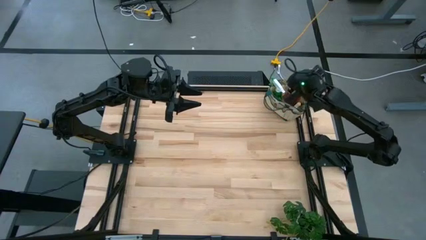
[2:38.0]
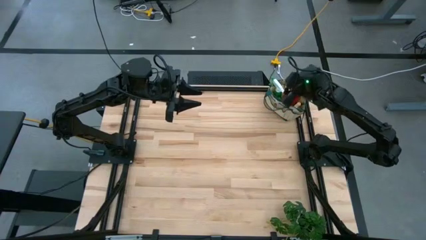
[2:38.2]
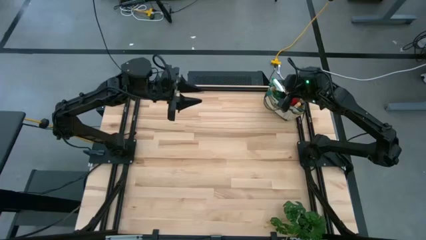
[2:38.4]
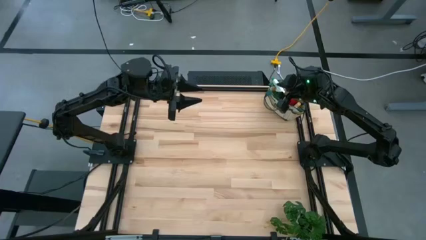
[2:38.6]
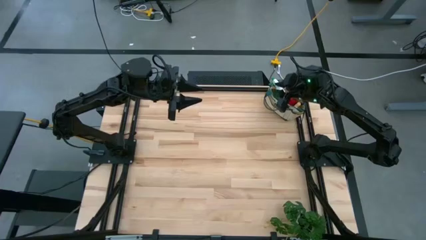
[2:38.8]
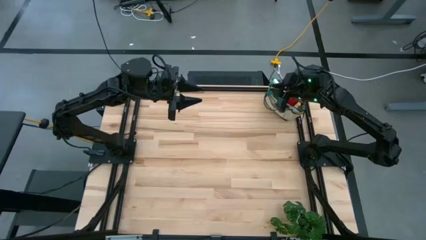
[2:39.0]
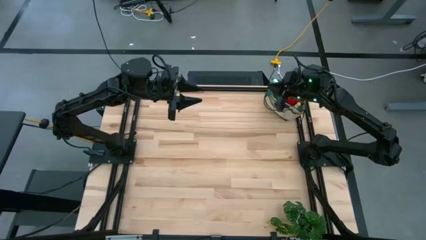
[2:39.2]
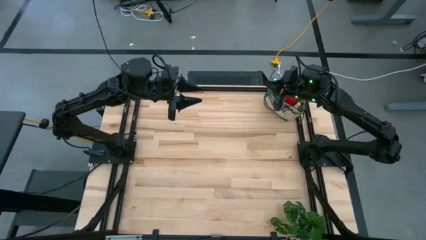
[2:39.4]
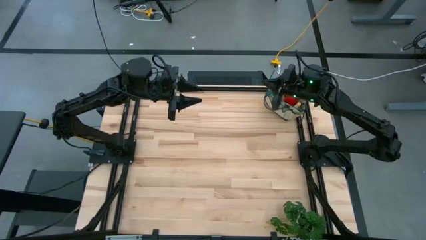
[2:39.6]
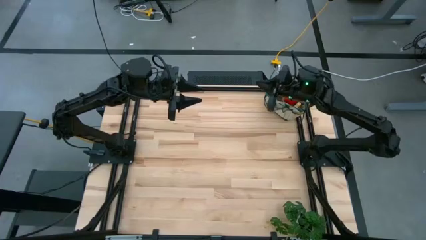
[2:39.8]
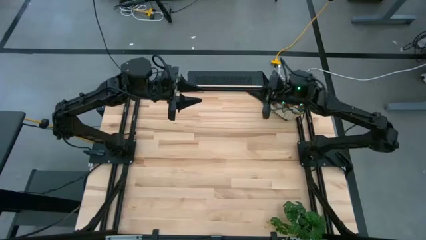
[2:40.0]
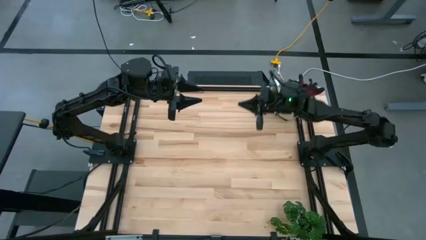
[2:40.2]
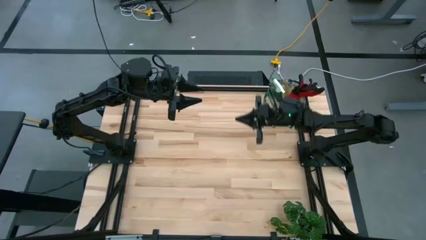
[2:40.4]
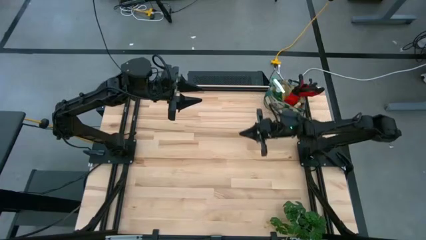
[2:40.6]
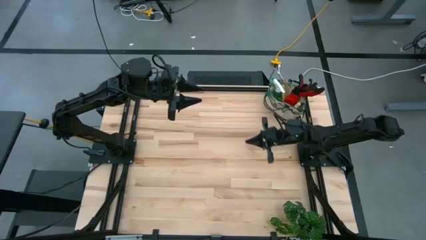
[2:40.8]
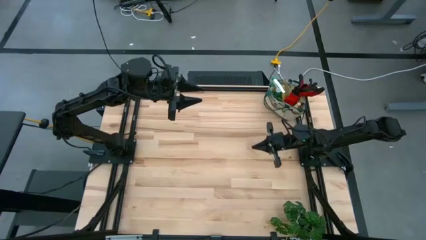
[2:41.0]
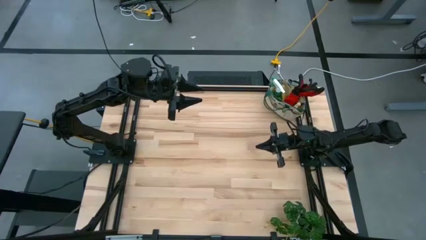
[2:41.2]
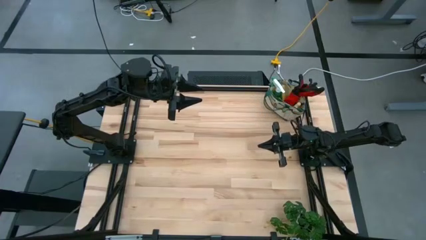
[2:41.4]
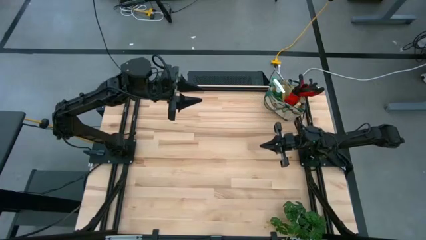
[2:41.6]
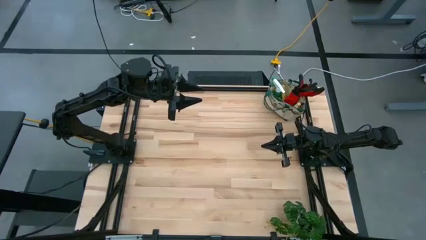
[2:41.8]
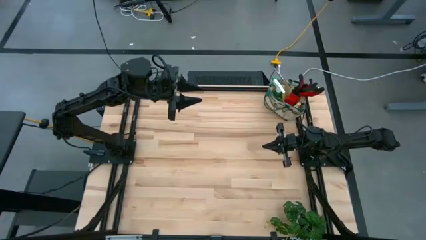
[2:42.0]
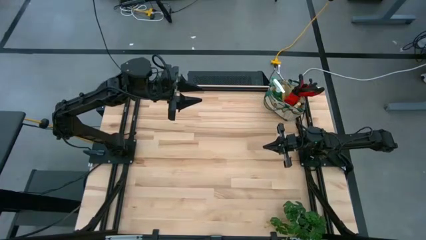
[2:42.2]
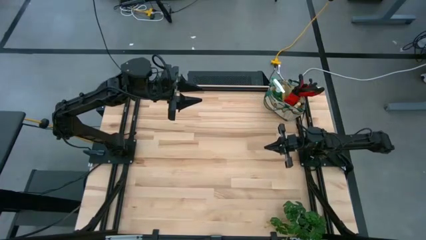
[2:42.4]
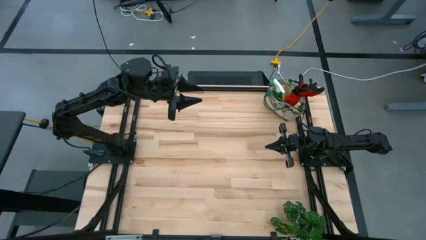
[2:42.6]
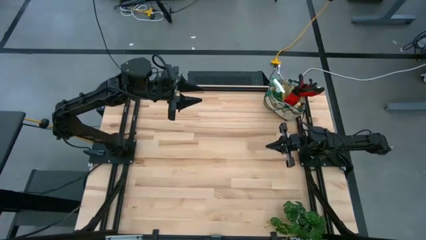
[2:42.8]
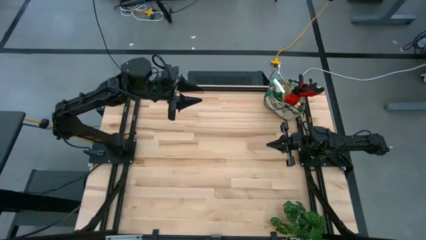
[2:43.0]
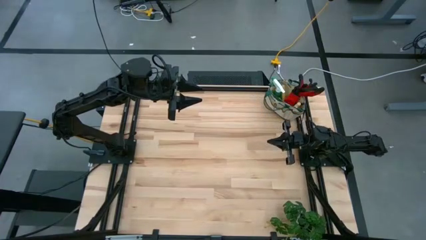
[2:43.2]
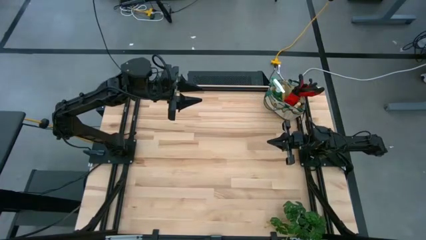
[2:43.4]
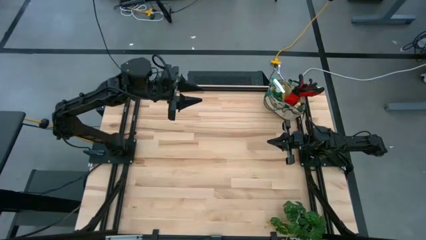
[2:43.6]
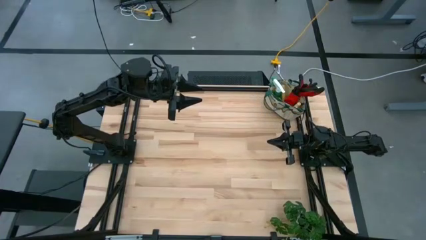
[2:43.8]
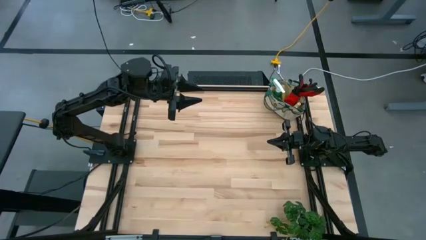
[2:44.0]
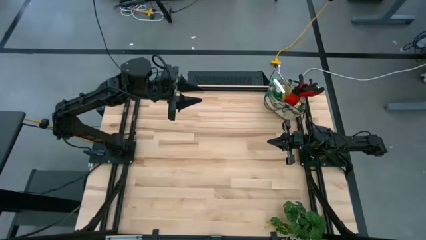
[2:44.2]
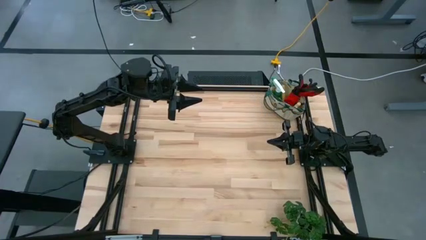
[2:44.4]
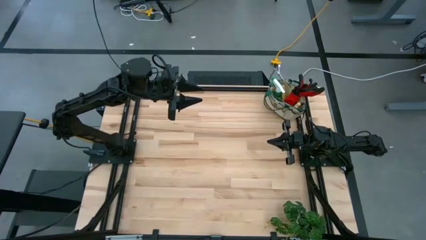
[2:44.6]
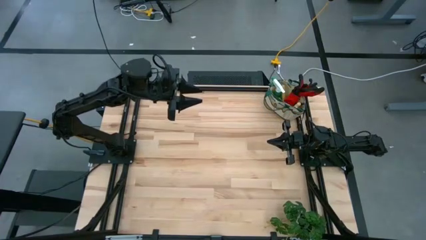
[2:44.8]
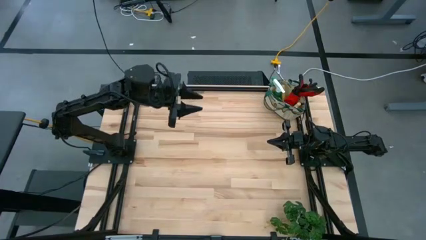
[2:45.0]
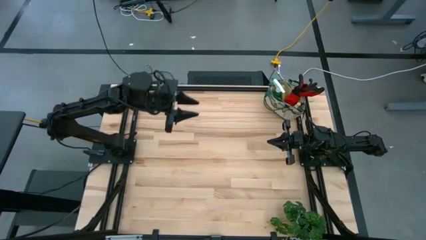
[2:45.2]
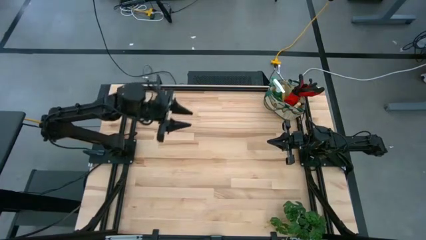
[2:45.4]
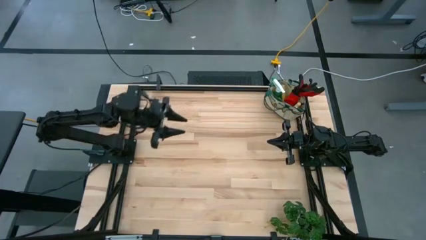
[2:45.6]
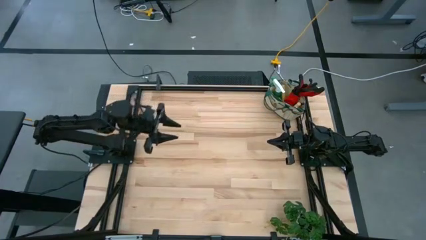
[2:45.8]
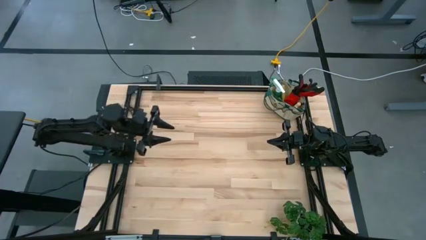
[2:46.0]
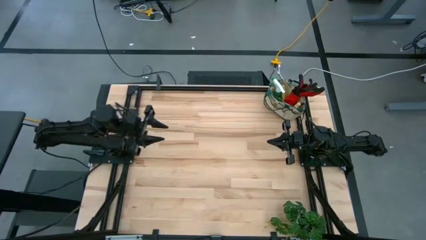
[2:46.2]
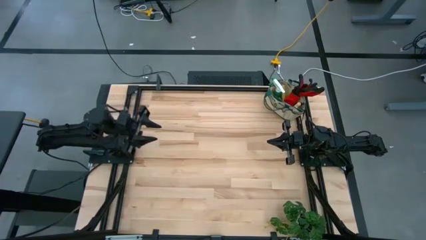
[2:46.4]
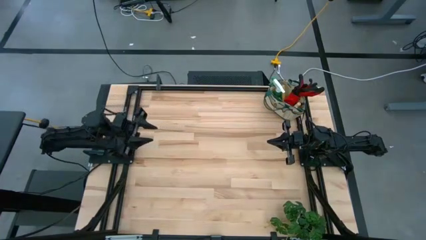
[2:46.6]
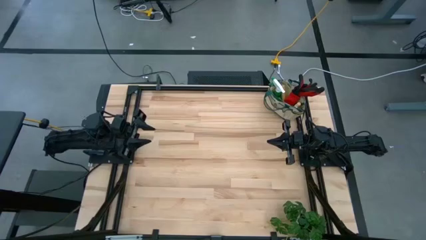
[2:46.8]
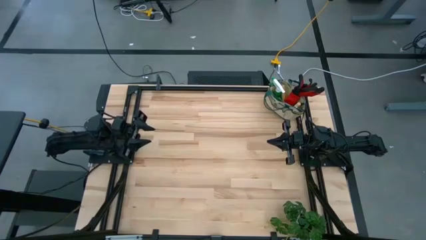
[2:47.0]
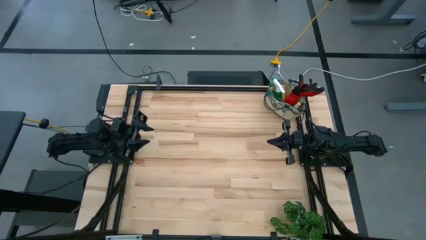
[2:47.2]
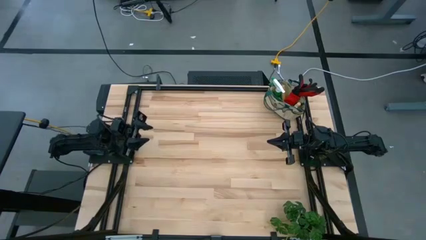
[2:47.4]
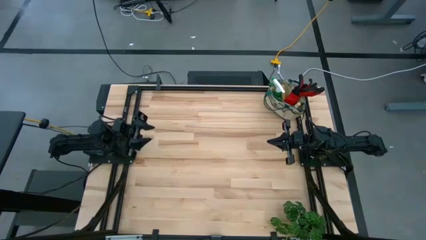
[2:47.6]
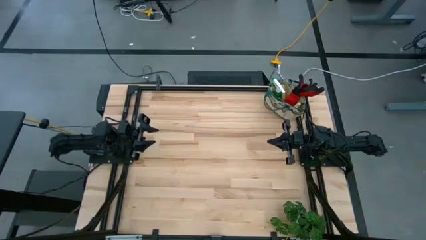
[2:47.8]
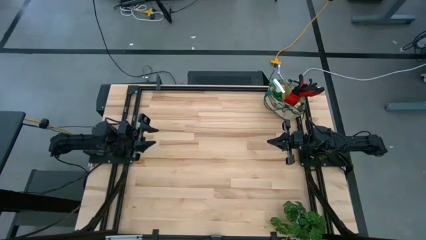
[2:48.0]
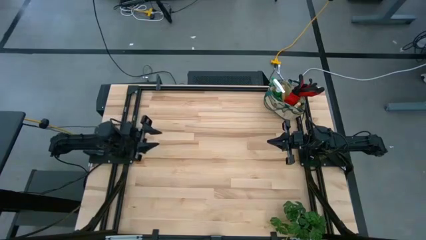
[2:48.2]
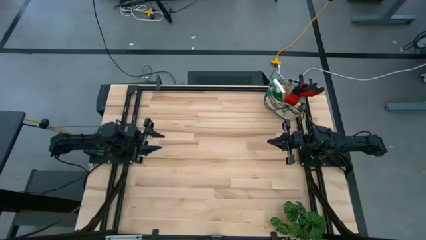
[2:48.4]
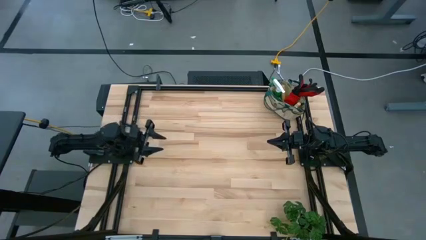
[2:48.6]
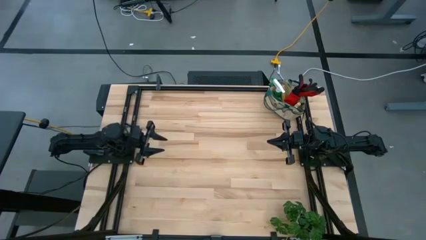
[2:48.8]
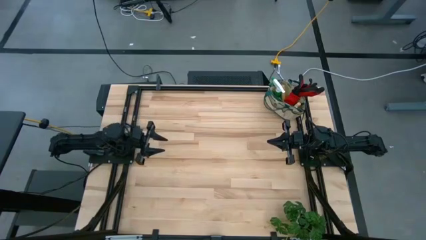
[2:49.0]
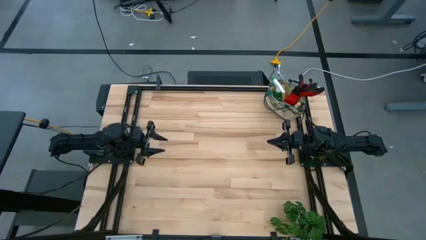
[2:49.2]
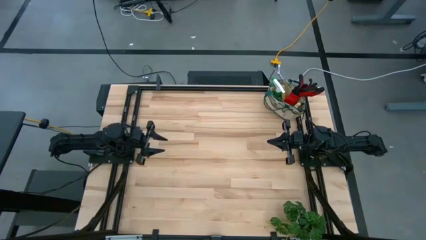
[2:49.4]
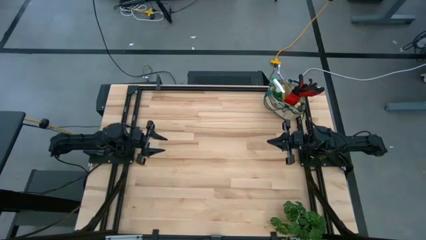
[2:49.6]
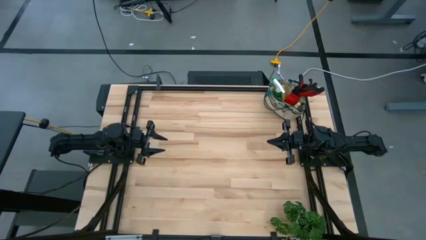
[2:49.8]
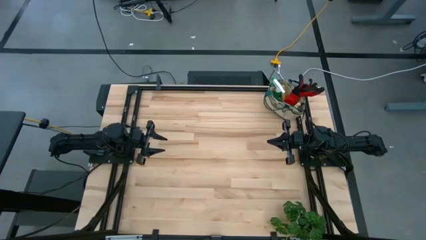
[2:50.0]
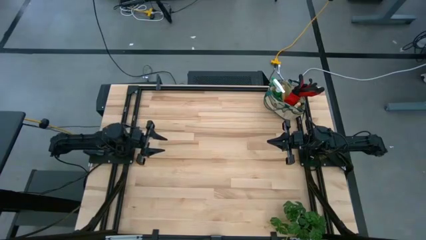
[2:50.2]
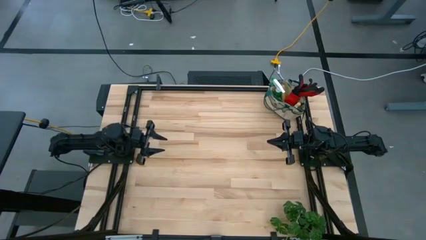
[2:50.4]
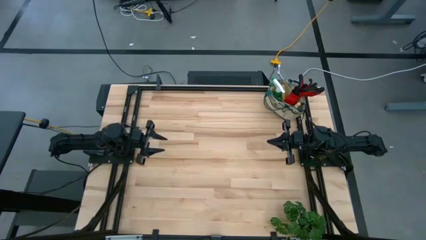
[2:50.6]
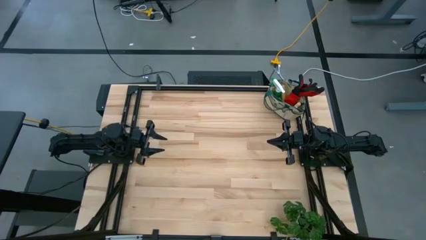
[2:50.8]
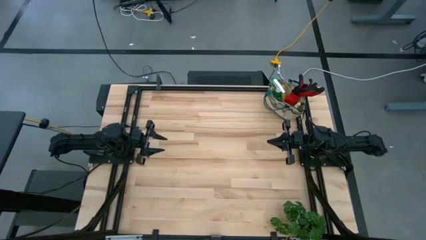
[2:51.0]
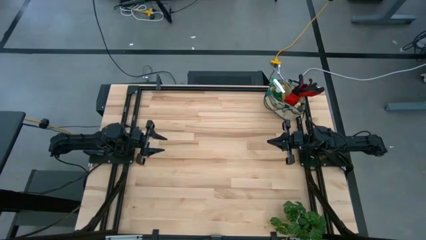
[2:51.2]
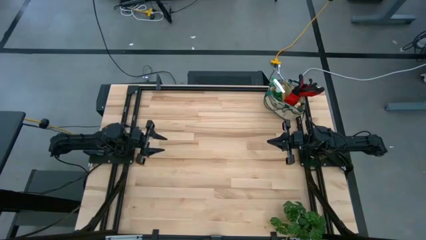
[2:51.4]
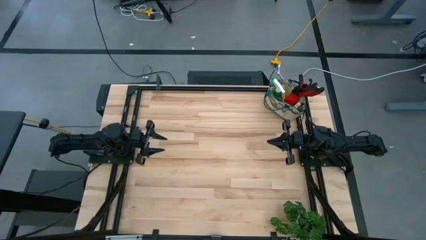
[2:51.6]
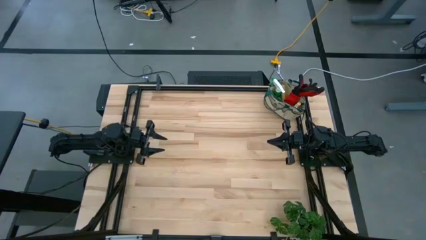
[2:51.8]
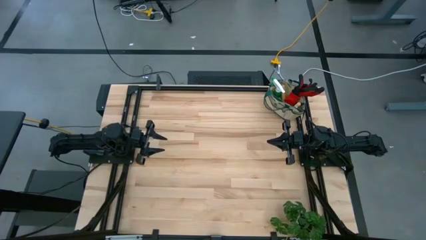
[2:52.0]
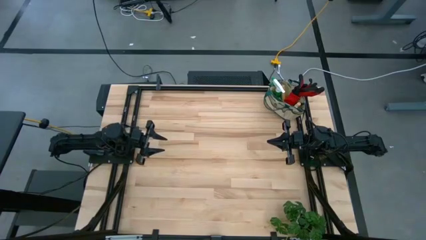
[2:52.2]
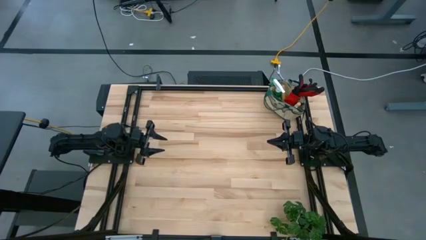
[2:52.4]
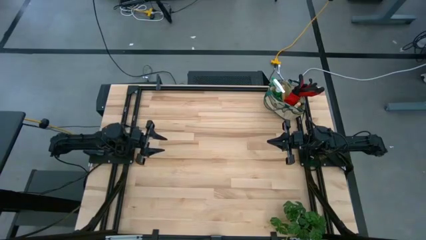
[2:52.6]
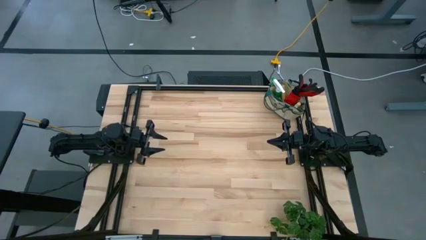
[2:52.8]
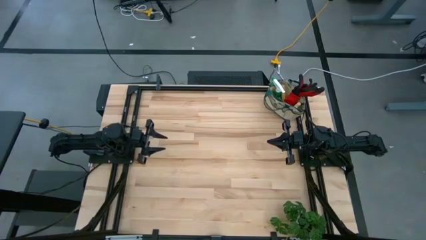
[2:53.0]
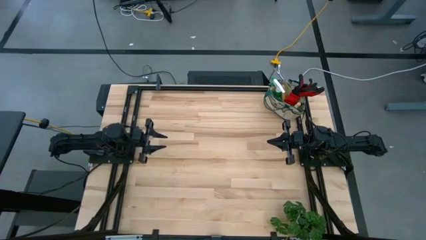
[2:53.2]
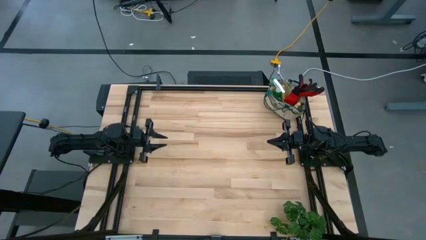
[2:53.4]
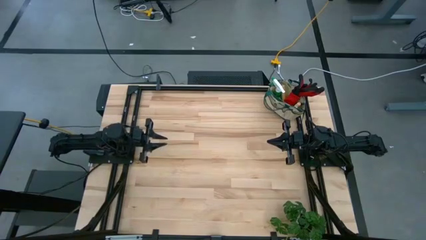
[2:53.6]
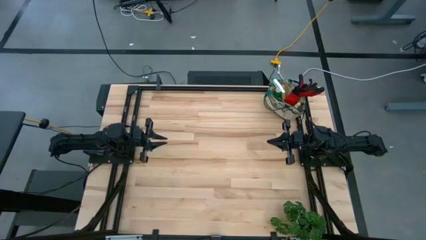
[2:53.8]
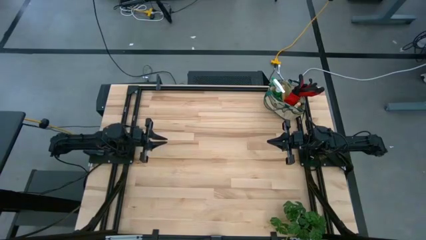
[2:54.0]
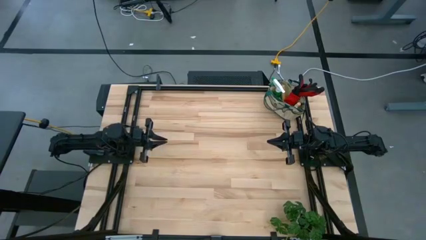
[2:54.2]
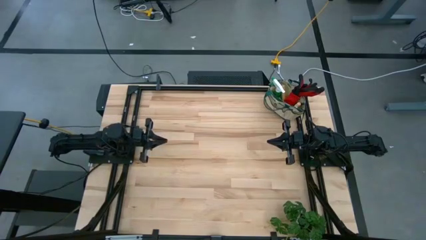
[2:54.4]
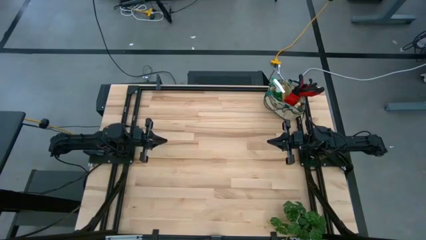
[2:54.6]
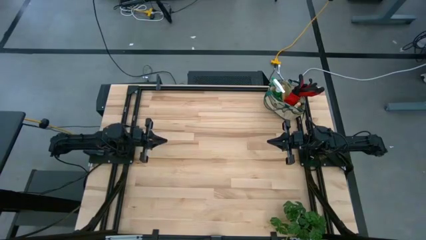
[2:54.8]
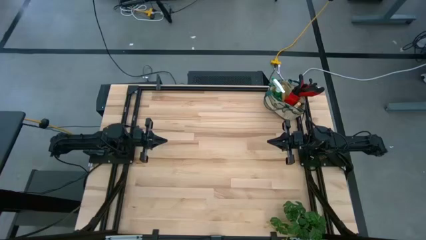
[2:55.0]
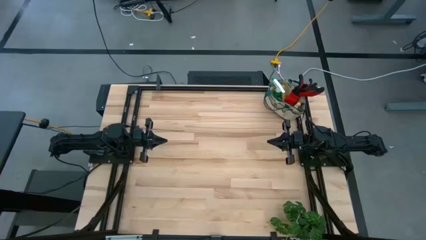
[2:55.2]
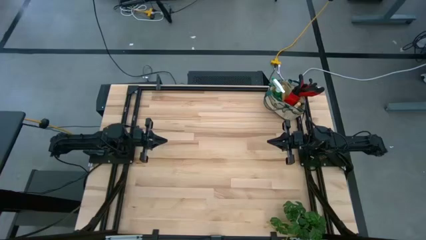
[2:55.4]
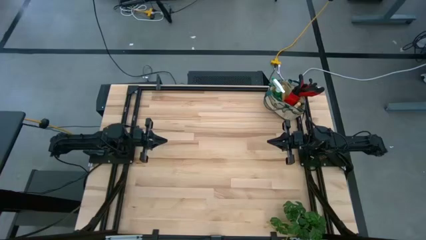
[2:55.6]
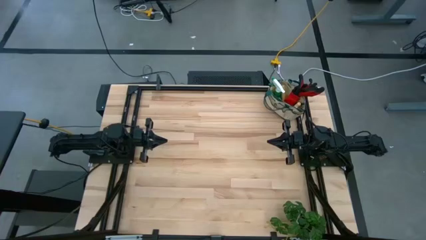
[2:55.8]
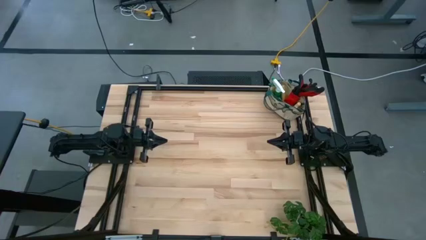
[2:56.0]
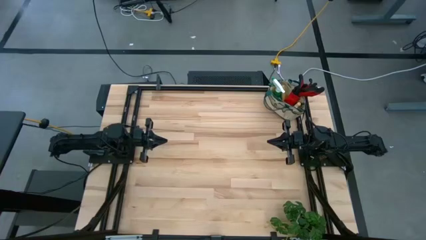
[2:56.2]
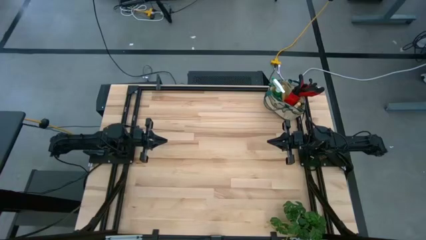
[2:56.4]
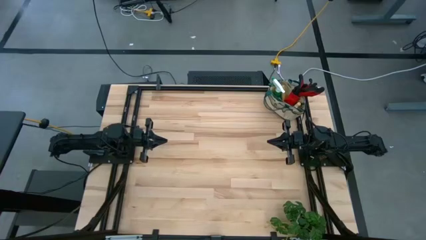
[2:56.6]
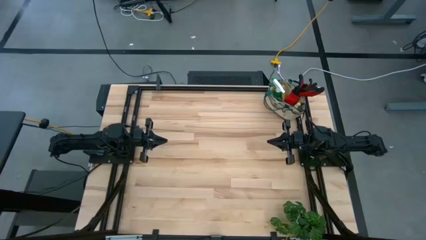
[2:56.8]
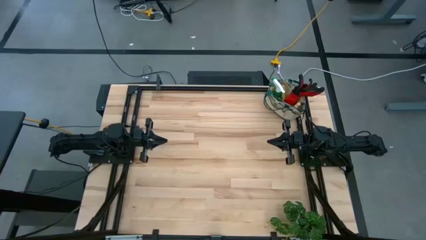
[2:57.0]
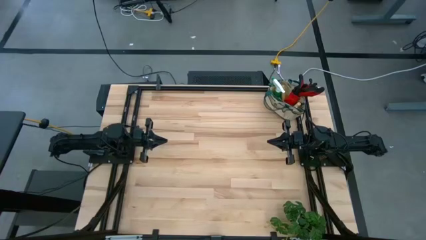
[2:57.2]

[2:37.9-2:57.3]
Task: Pick & Place Garden tools in Gardening bag
Return to Home Position
